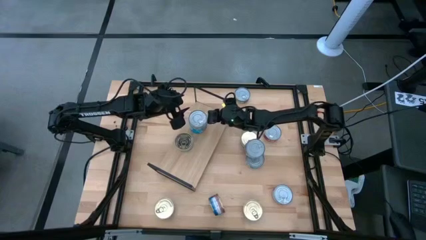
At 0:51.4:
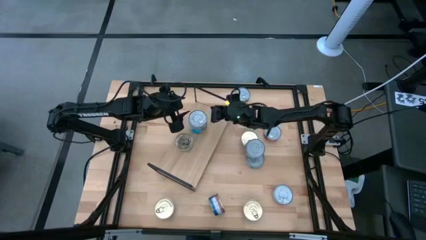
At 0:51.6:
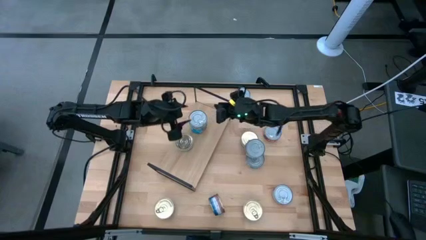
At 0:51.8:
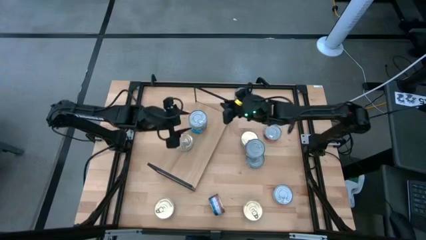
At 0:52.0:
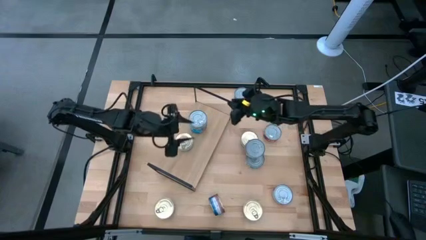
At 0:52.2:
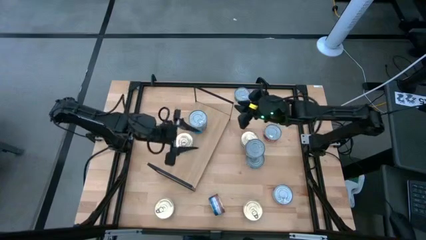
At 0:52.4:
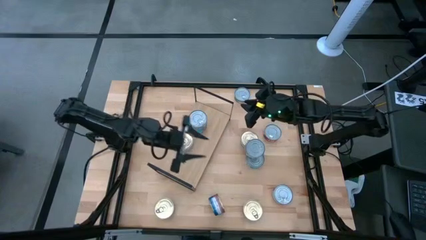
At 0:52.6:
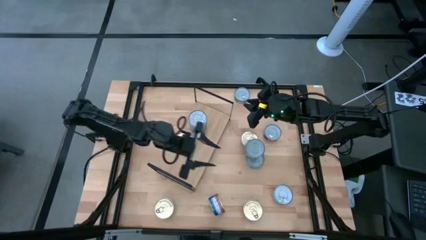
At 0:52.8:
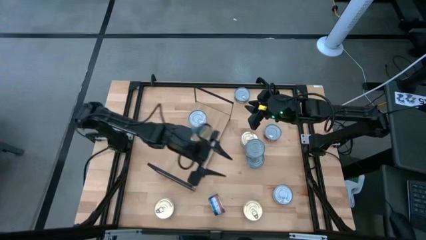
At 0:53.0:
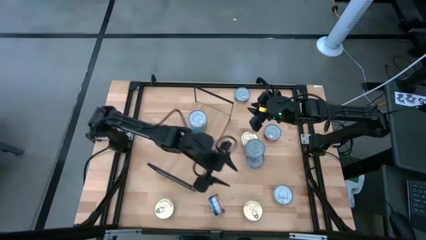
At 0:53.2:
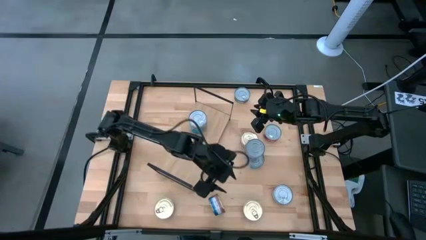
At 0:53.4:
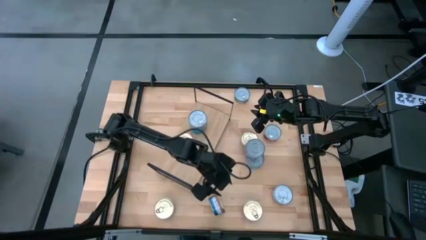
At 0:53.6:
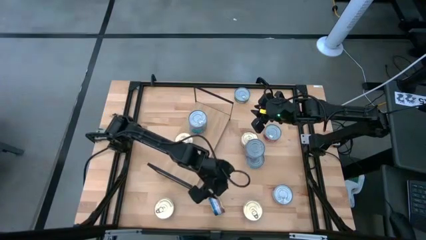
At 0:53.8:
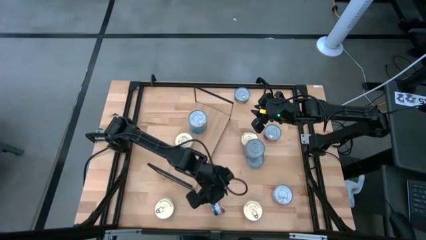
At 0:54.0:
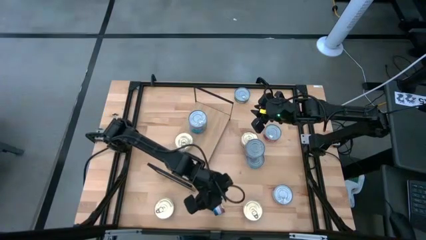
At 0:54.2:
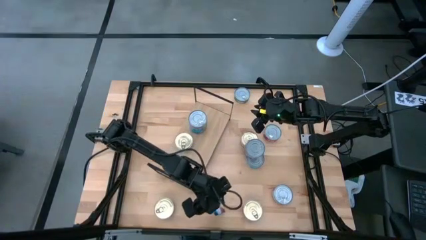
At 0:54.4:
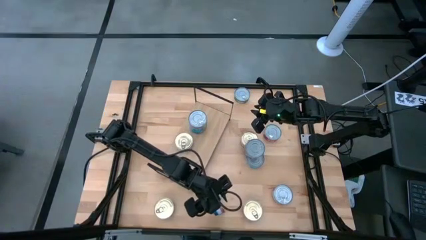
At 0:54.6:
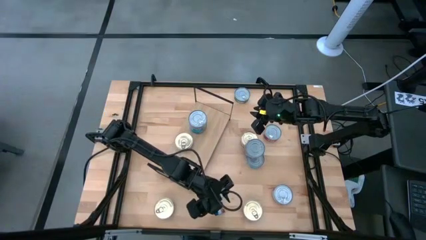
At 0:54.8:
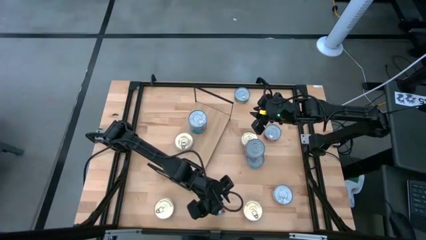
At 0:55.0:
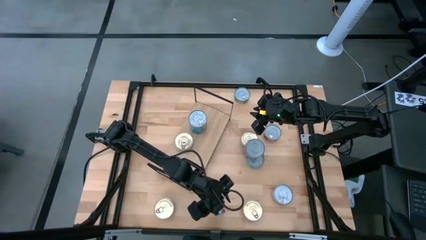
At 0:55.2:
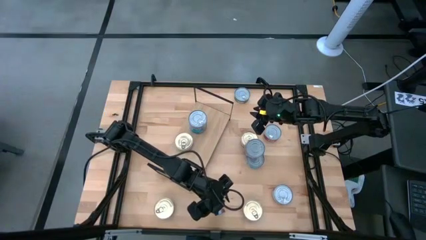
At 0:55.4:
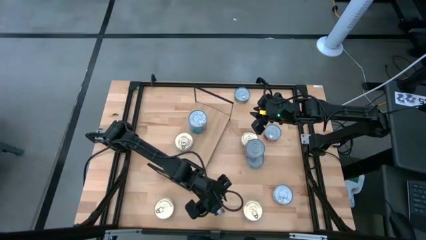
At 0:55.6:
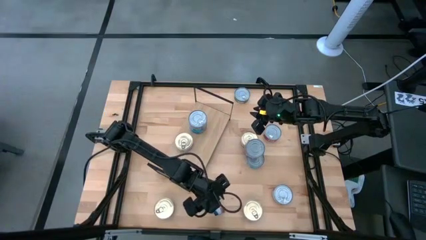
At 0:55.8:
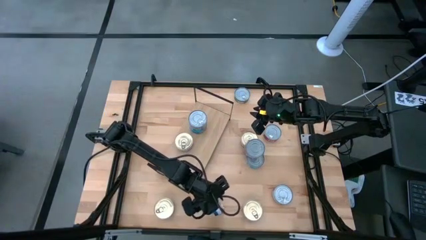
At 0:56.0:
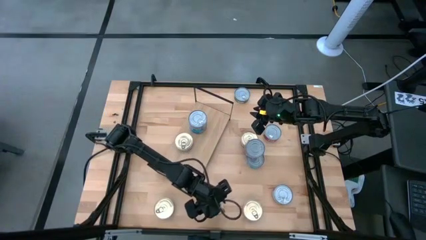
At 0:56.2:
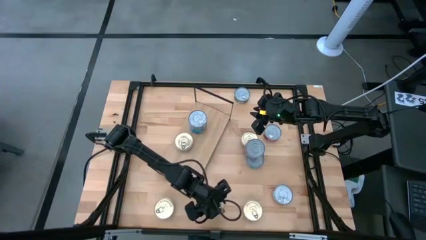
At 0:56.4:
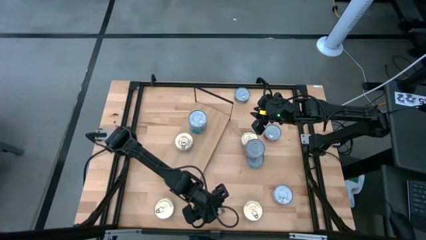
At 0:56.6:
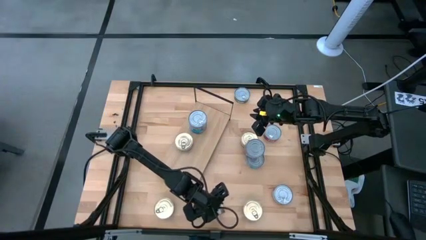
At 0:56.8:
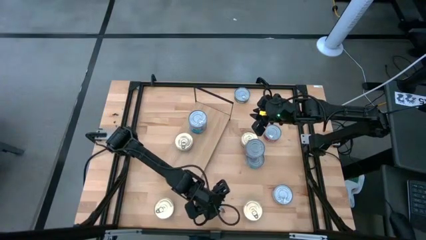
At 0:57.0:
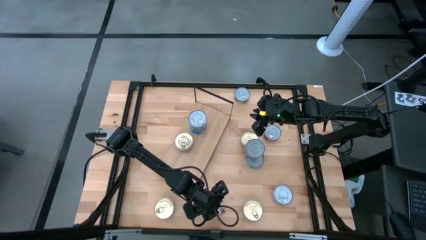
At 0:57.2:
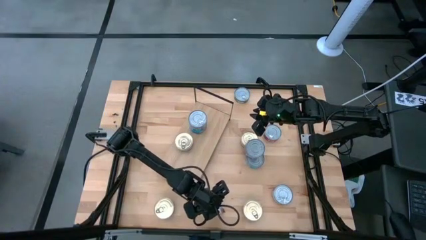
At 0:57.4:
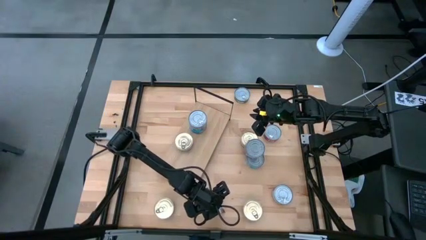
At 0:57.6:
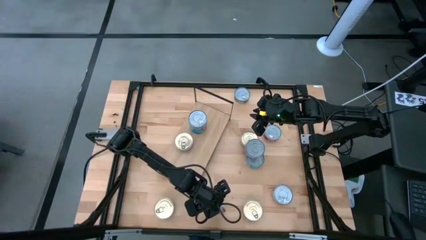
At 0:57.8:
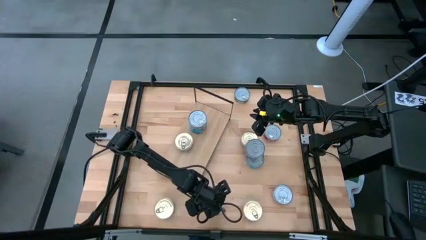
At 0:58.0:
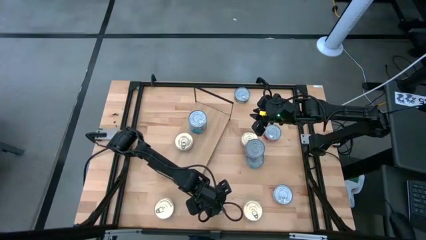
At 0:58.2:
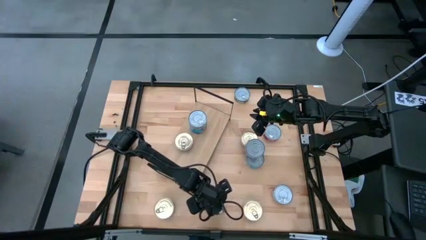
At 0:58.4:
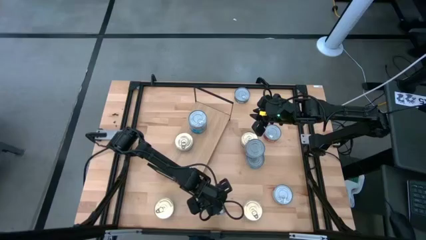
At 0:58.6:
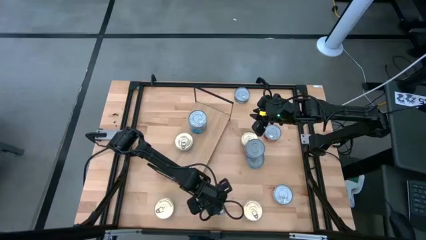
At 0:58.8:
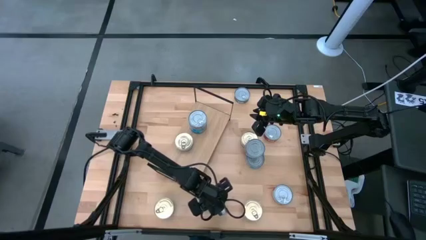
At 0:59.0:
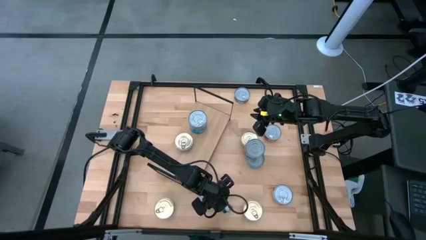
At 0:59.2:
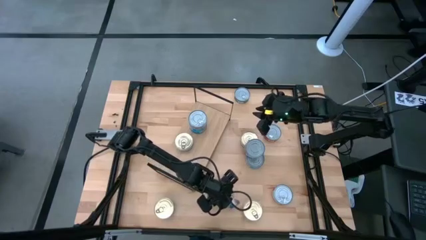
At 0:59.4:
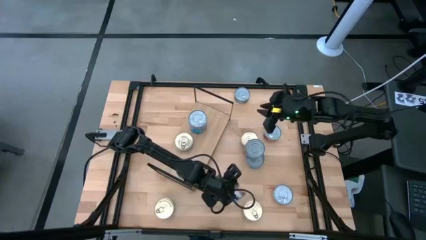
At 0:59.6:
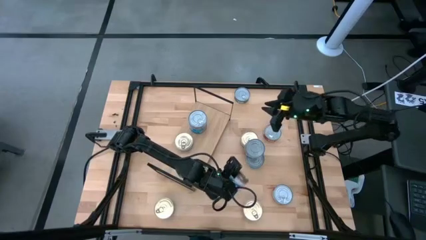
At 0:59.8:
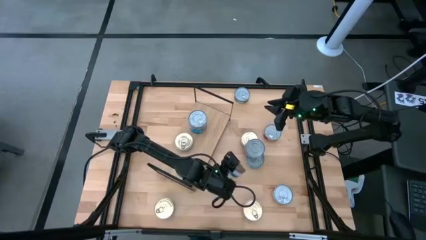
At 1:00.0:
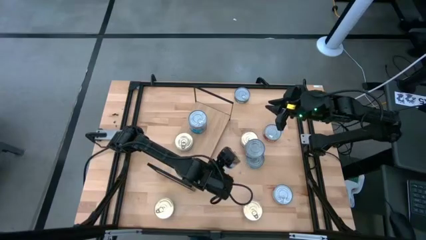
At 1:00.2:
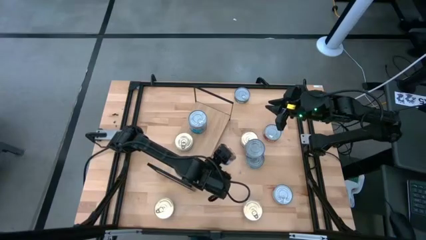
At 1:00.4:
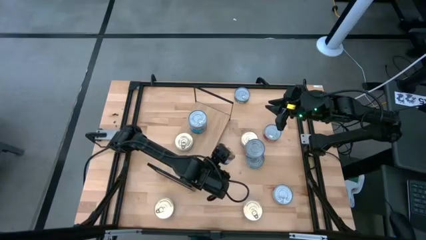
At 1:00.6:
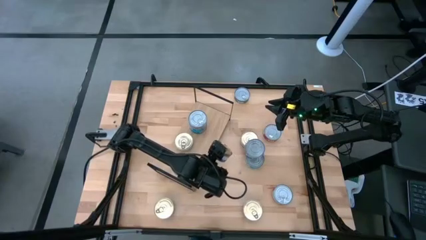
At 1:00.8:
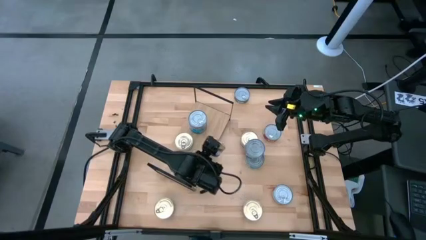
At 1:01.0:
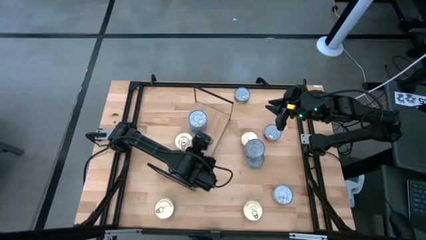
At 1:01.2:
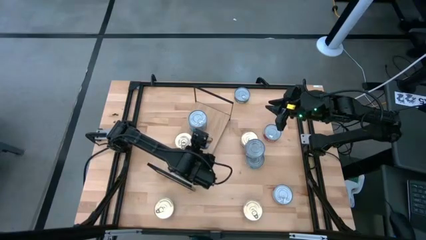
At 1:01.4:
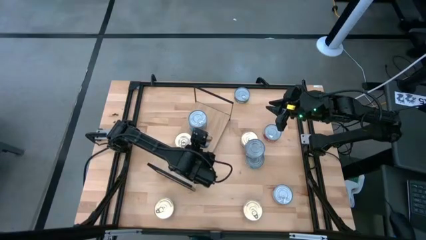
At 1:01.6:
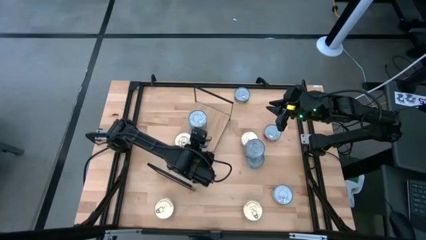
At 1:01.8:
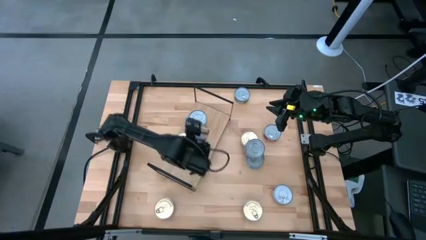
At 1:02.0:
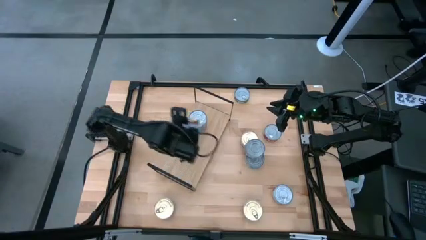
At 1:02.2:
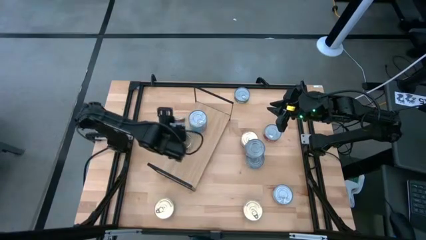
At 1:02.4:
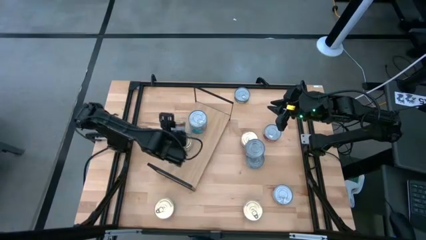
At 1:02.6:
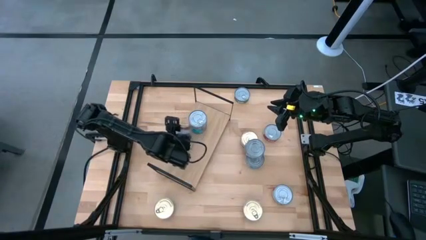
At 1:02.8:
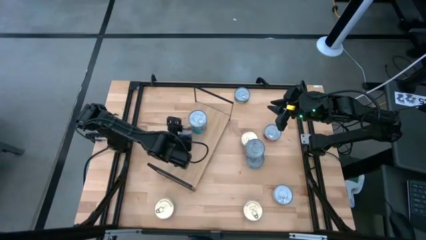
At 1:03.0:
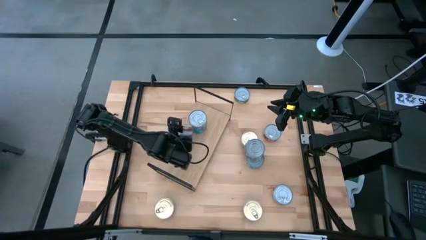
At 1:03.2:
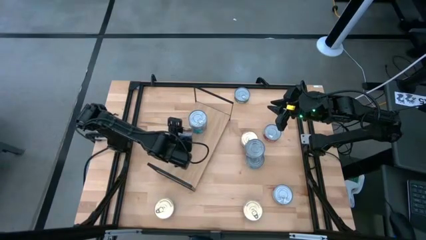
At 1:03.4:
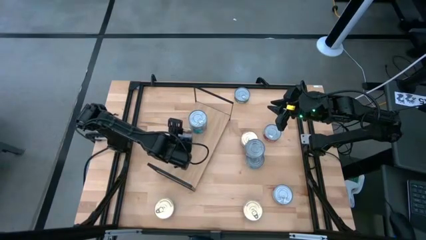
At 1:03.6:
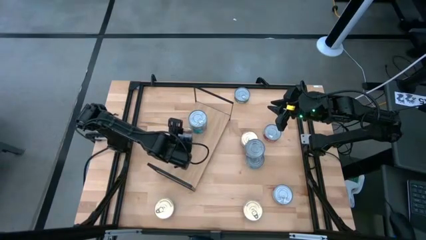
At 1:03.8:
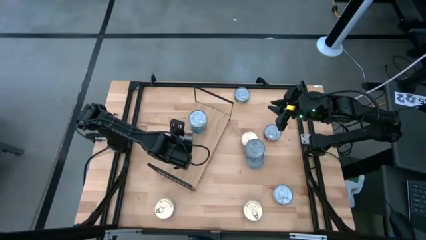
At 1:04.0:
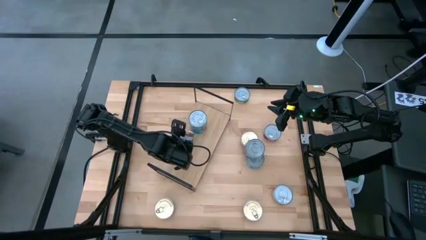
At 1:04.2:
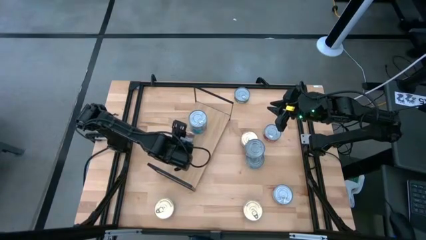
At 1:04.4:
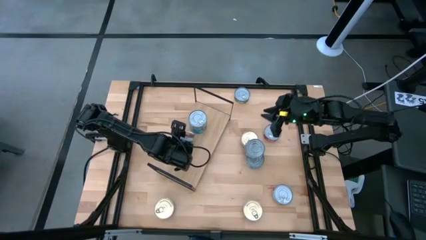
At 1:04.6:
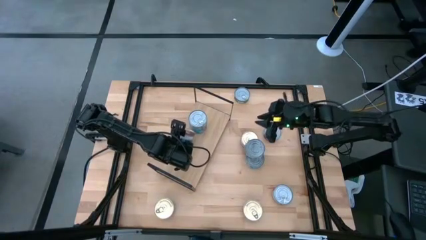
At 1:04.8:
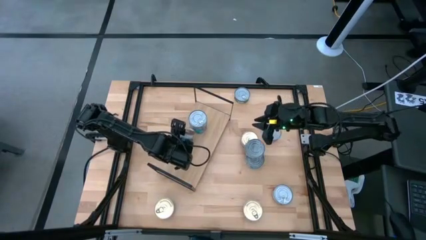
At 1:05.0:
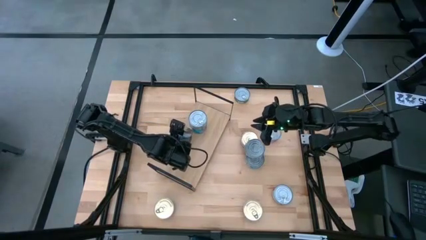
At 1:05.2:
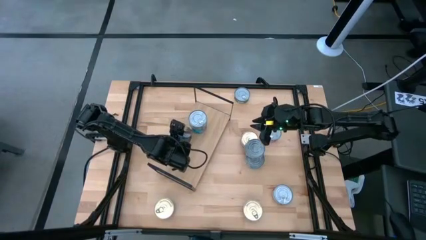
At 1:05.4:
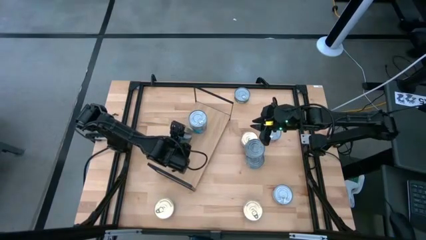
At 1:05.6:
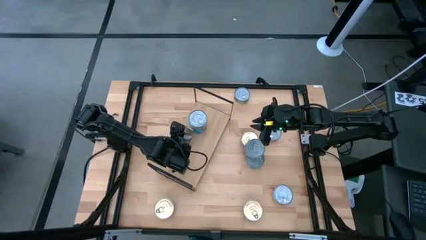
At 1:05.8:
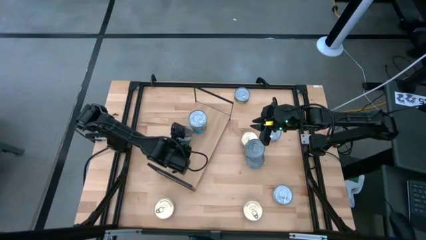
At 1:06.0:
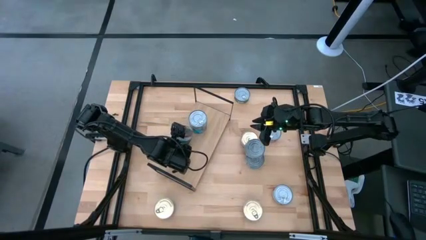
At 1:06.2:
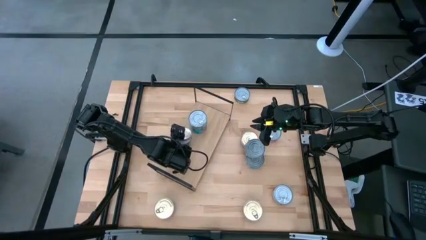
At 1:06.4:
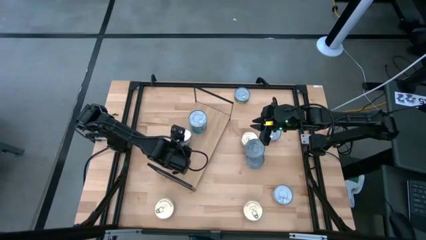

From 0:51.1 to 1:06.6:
Task: Stack canned seafood by type on shelf
Stack the blue tuna can on top of the blue tuna can on the shelf
